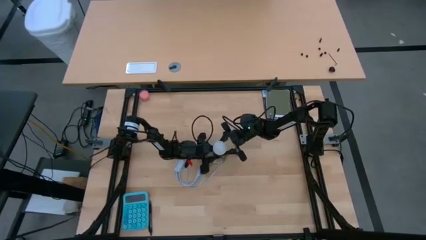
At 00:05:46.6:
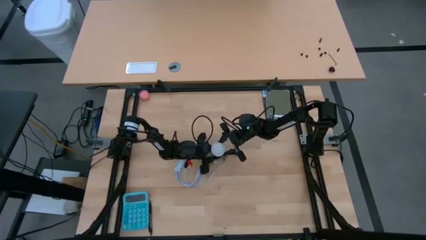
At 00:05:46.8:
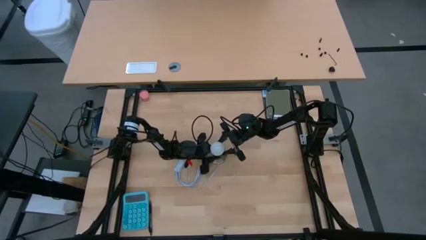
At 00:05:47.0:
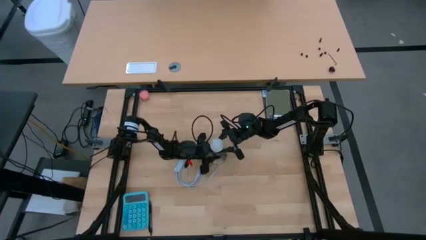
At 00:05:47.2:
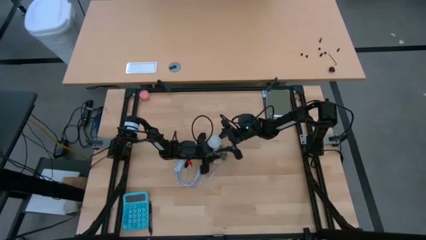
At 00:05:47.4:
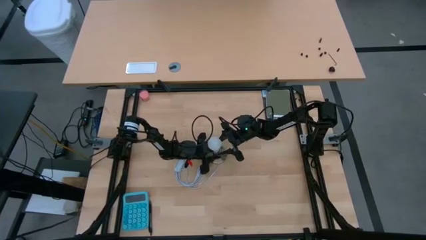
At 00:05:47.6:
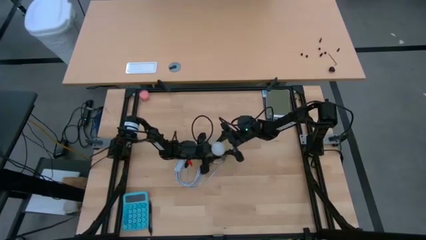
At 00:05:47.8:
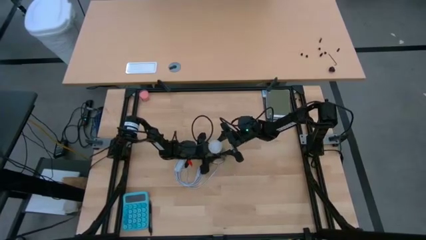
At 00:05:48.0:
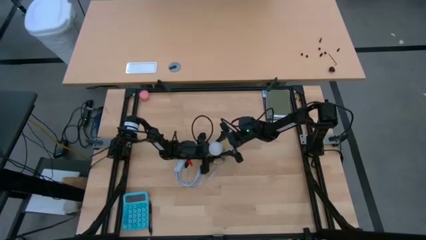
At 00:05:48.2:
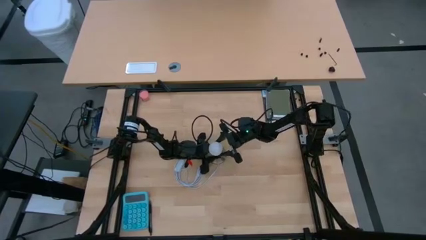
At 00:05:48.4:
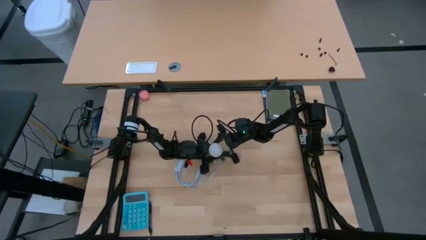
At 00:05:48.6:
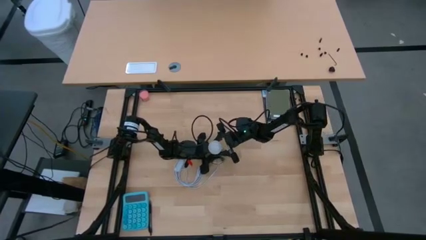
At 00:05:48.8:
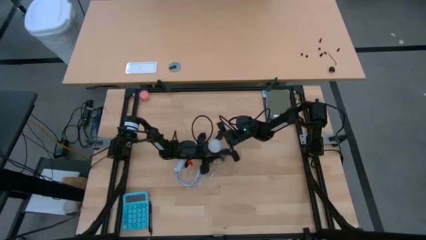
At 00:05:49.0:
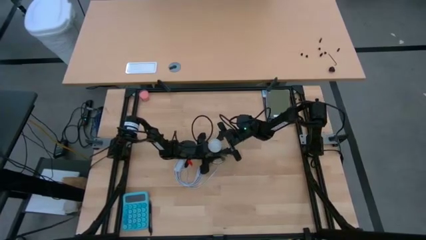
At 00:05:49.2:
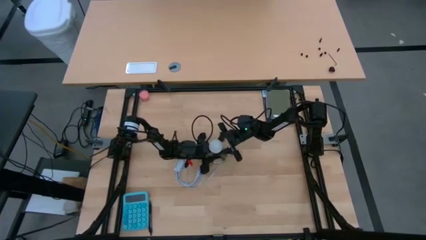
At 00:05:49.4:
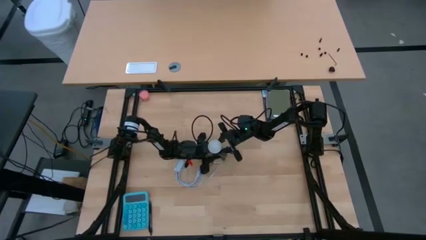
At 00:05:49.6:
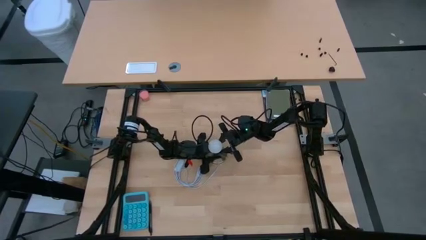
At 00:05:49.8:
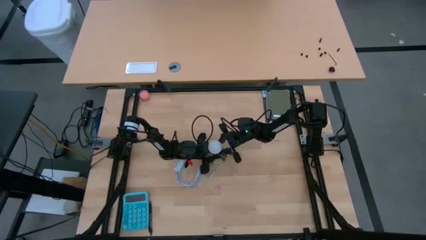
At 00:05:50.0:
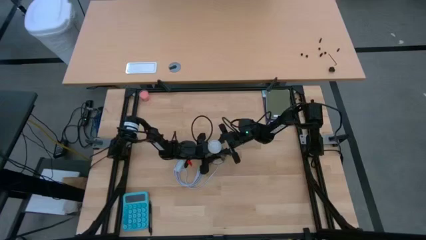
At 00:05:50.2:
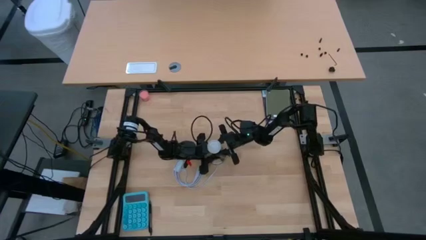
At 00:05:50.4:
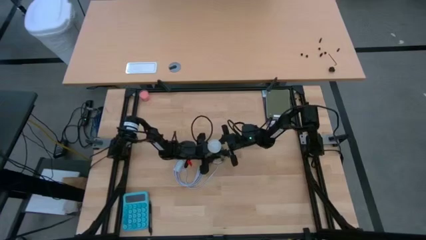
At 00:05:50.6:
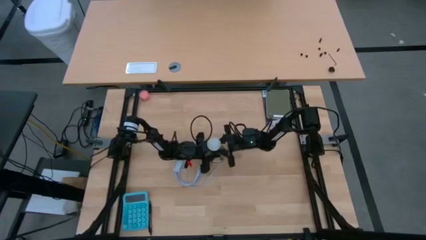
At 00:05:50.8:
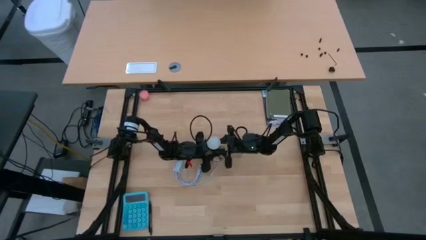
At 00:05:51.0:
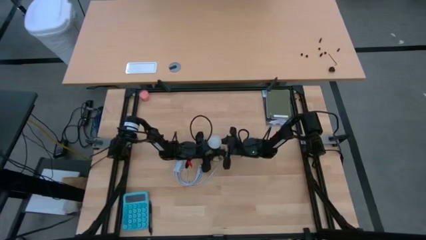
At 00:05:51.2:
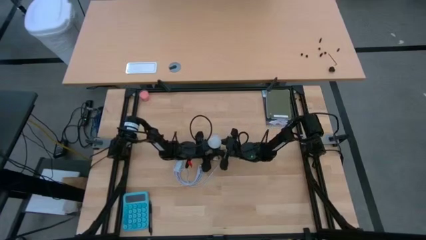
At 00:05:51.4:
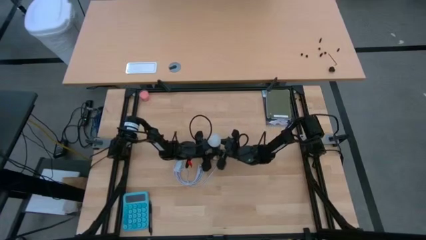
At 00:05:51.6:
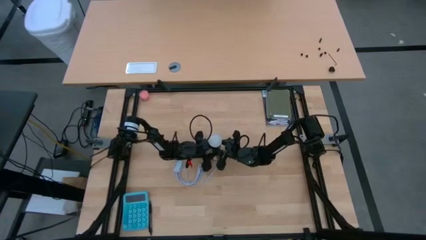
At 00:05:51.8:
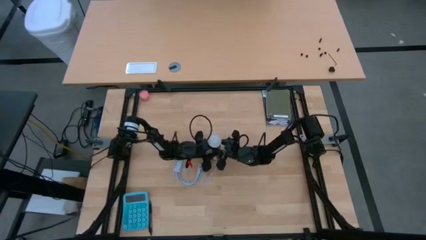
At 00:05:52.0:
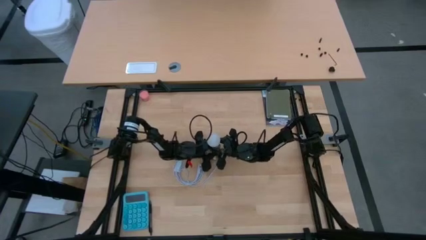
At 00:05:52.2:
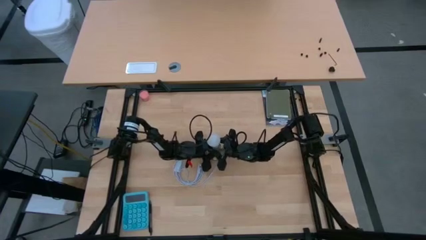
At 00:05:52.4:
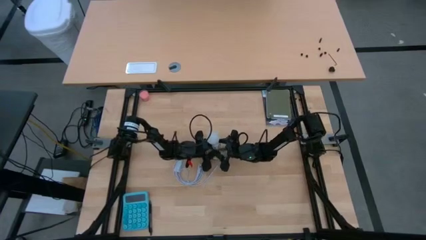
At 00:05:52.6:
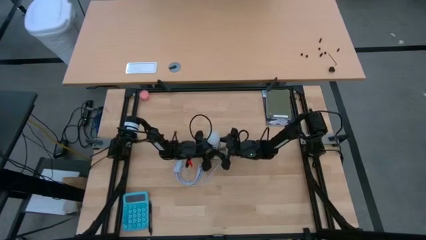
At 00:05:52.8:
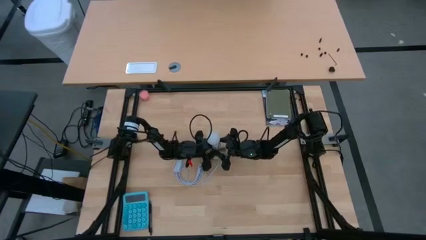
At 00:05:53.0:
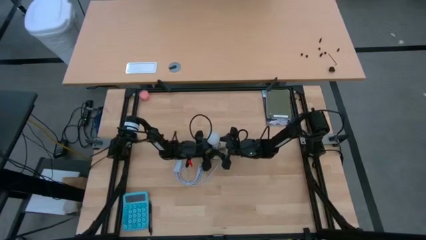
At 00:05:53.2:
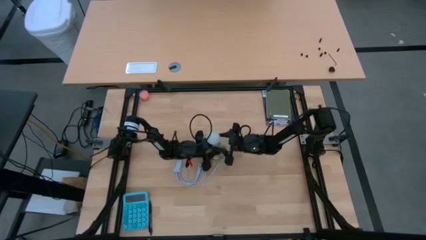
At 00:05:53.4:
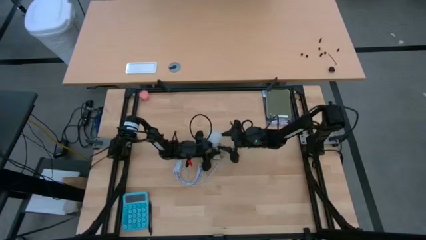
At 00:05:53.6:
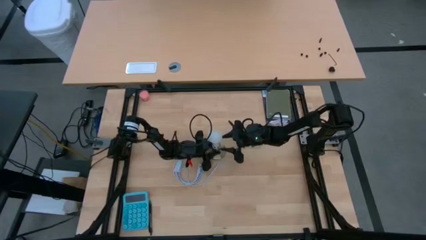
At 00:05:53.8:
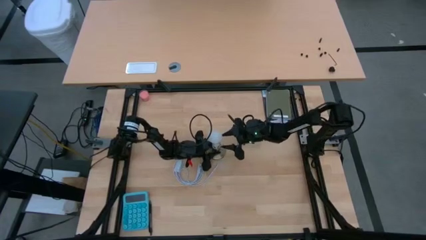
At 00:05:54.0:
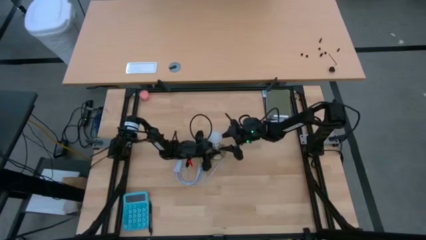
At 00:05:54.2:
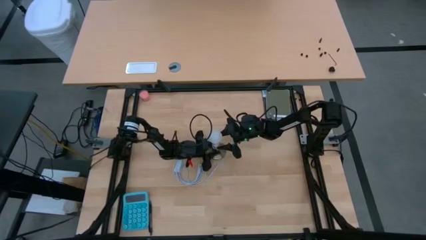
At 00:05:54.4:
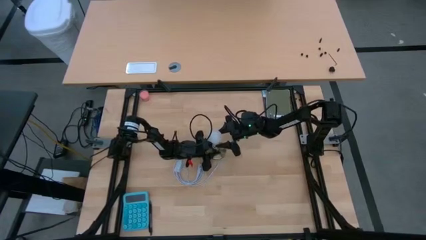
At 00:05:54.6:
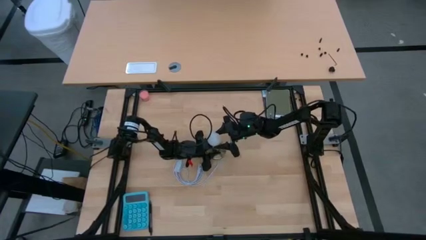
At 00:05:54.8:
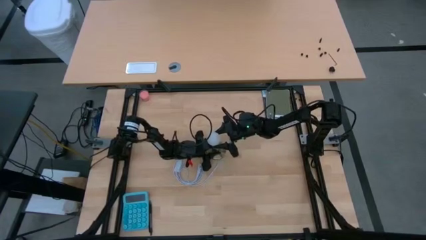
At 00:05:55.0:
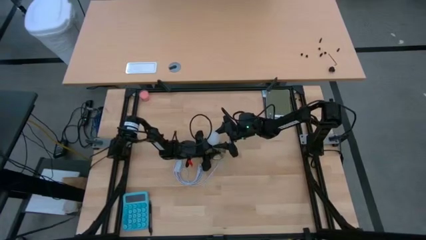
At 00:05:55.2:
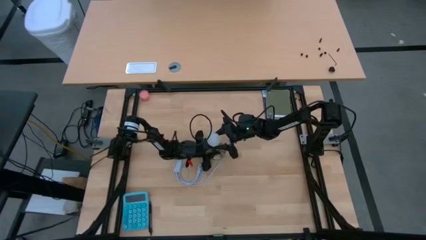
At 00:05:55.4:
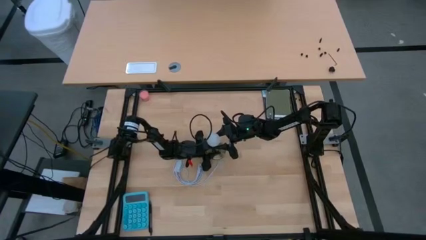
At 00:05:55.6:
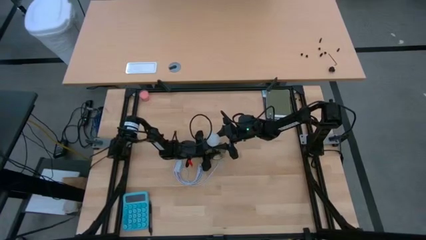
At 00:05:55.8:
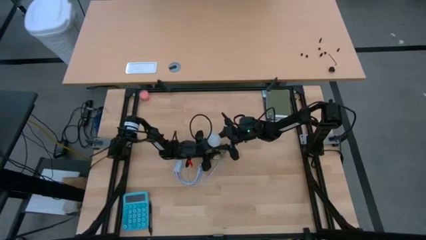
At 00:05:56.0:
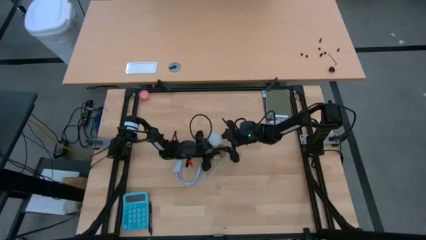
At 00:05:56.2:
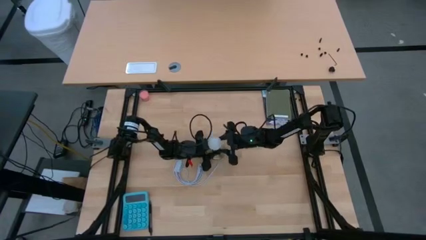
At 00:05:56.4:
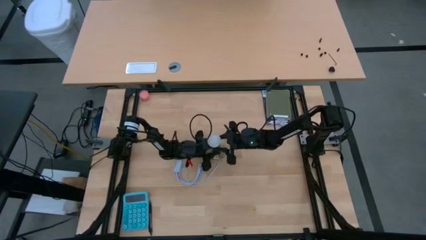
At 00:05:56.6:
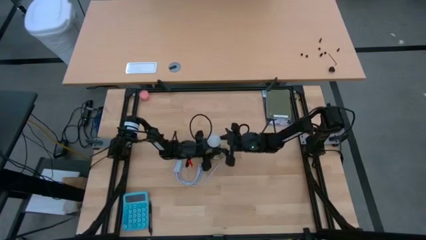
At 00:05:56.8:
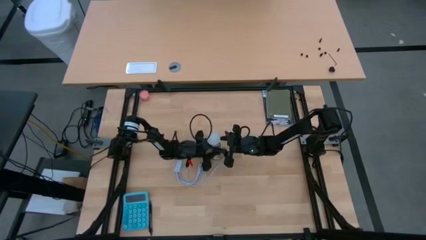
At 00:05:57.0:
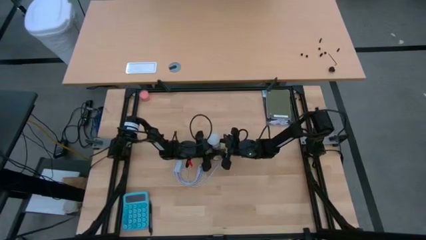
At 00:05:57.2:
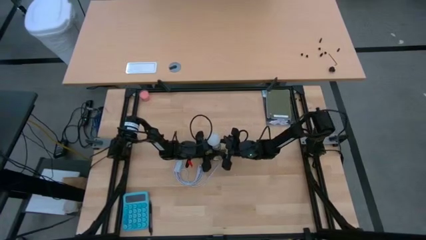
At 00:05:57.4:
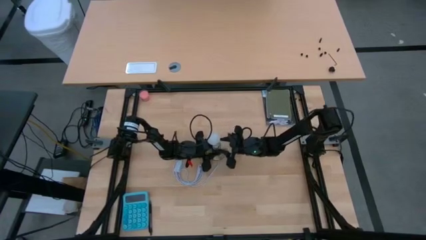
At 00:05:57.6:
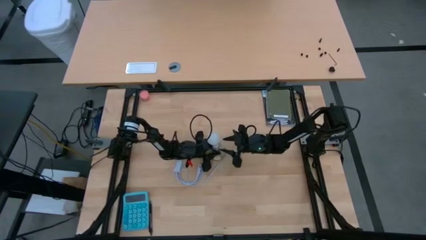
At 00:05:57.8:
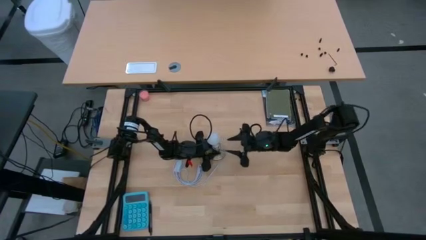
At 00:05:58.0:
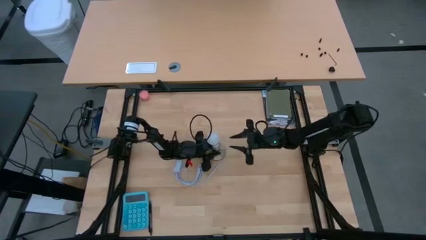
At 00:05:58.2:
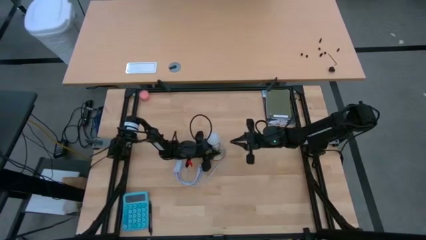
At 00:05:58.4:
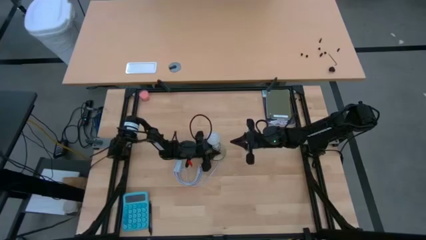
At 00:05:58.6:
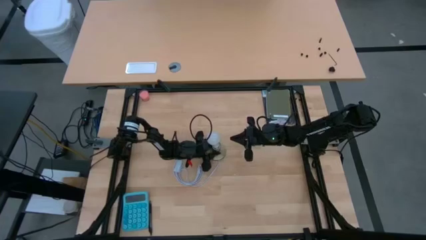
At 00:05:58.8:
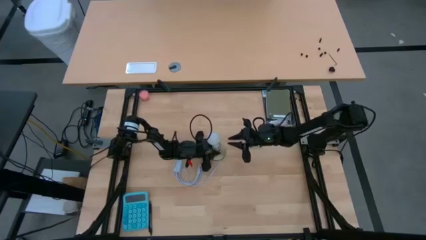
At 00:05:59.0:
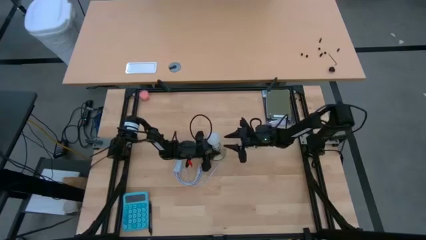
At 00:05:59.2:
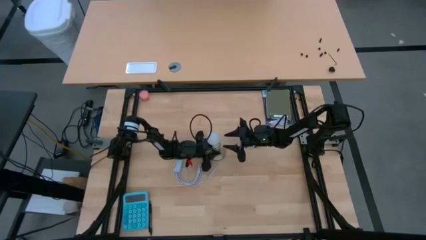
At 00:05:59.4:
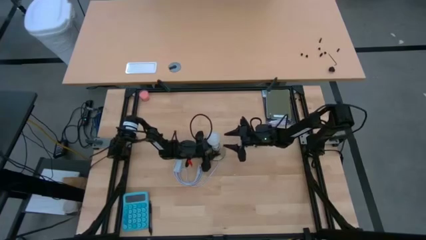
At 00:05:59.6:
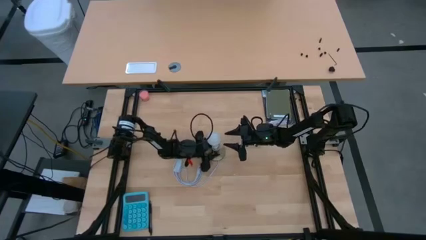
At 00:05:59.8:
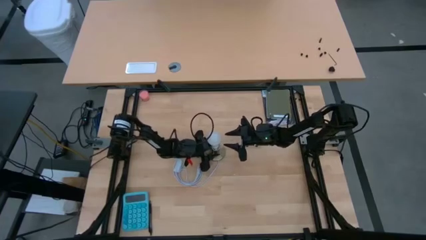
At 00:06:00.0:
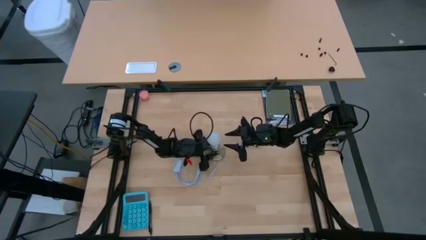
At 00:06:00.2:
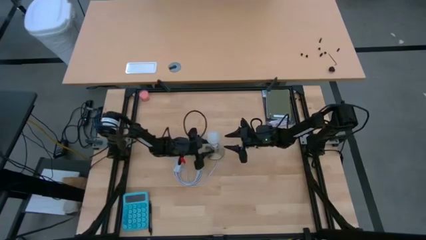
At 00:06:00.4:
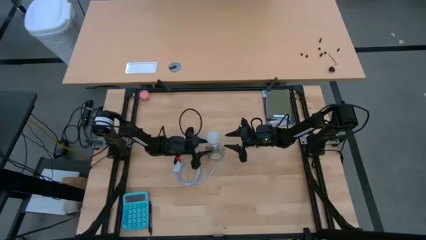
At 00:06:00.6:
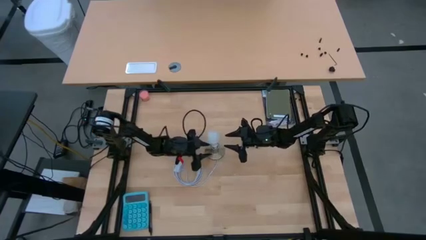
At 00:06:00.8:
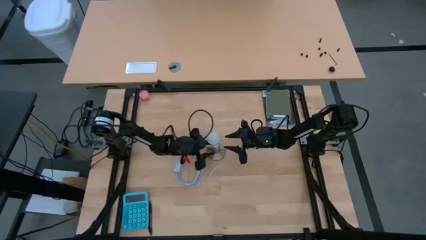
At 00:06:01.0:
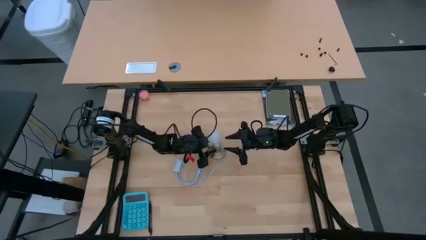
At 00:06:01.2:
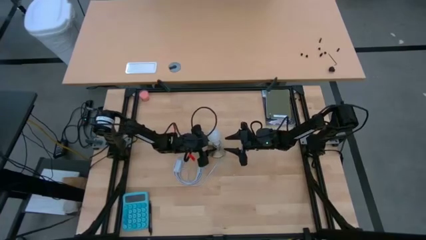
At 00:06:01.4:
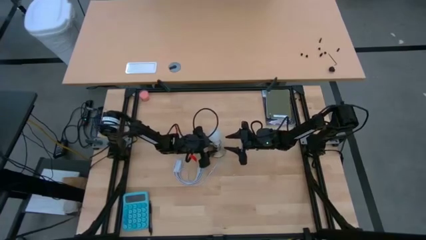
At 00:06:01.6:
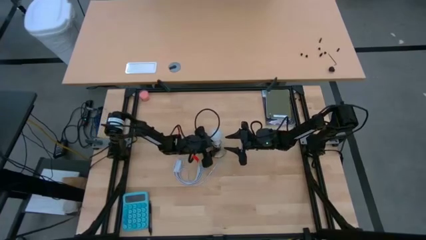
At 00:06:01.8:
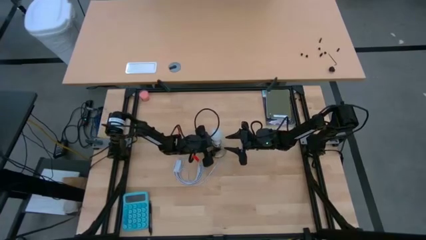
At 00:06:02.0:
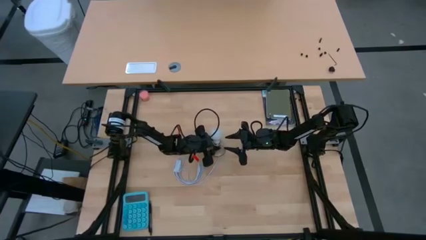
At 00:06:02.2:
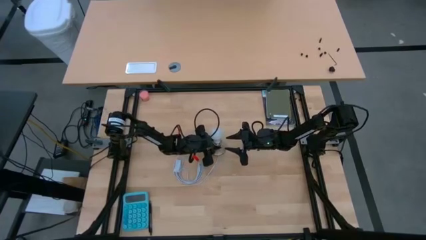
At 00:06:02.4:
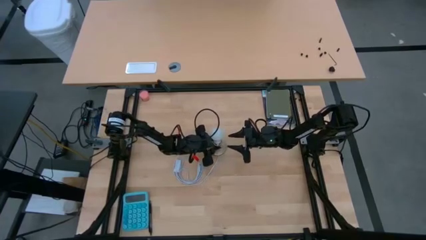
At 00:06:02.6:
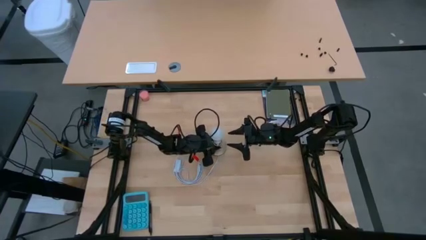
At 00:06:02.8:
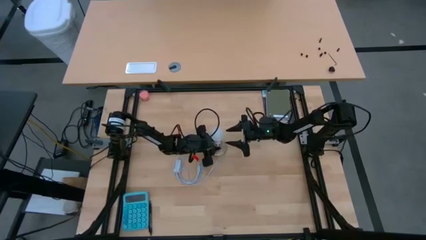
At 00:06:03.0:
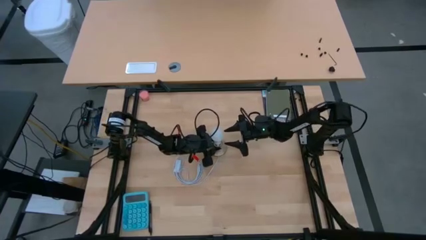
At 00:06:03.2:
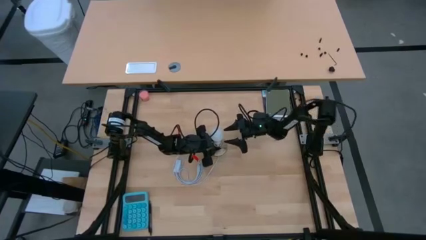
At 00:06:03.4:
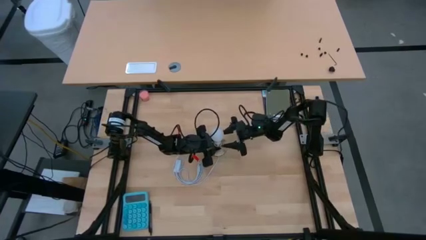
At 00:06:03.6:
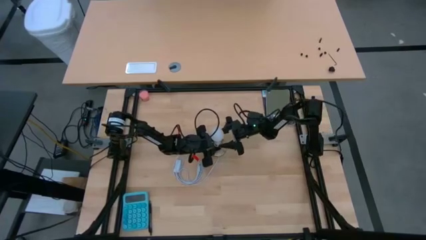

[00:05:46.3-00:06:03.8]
Task: Screw lightbulb
Insert the lightbulb into the lamp holder
